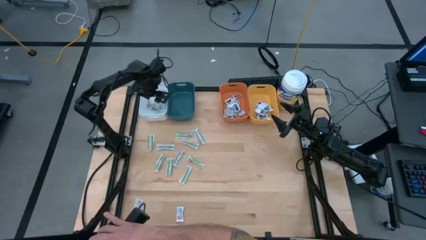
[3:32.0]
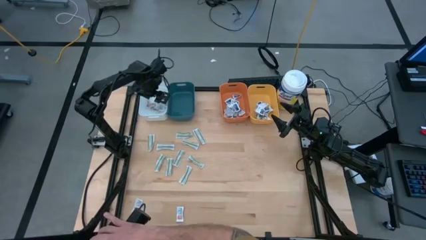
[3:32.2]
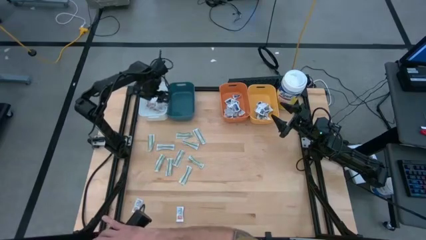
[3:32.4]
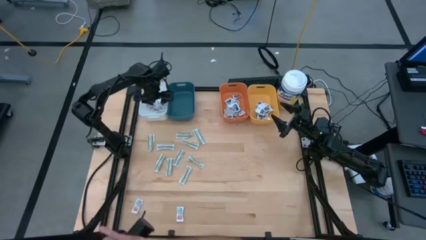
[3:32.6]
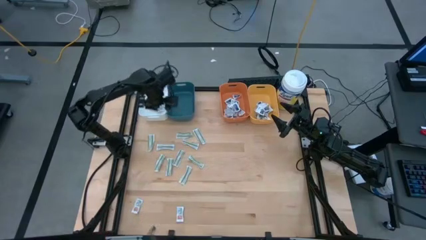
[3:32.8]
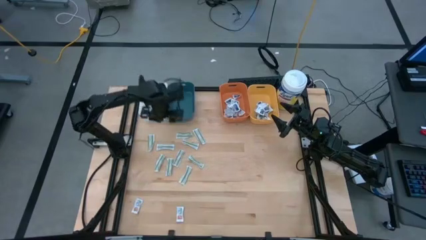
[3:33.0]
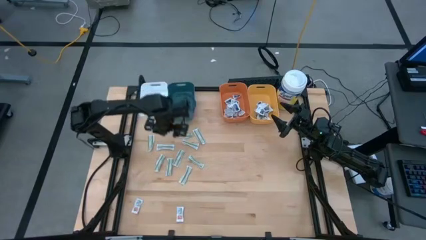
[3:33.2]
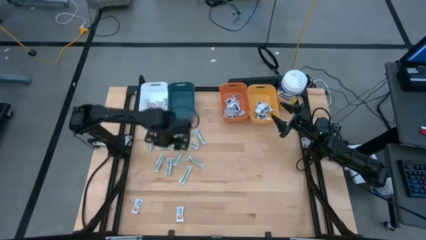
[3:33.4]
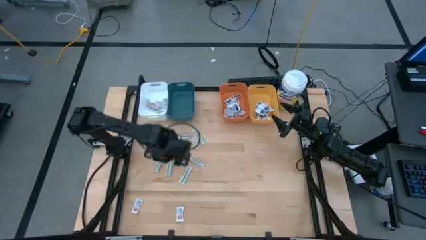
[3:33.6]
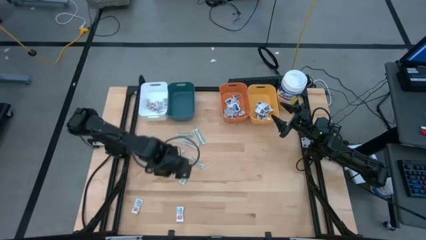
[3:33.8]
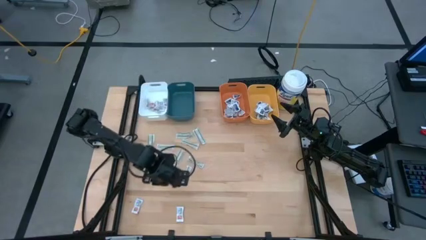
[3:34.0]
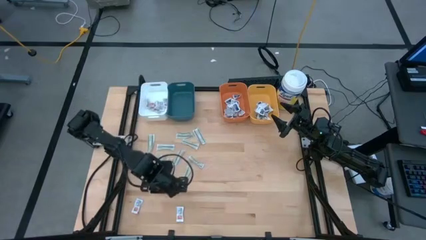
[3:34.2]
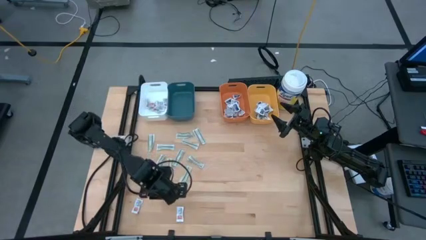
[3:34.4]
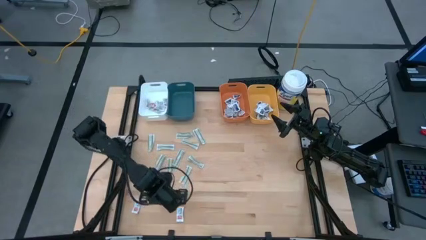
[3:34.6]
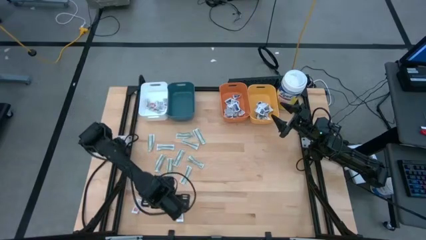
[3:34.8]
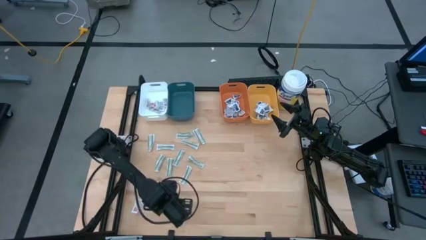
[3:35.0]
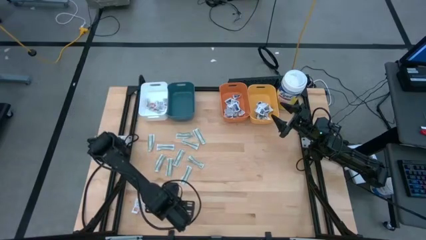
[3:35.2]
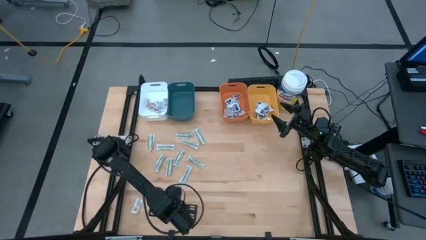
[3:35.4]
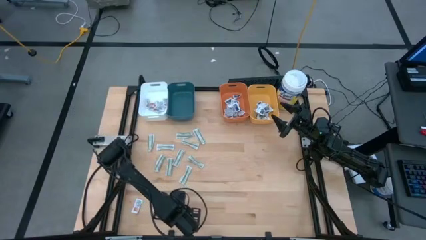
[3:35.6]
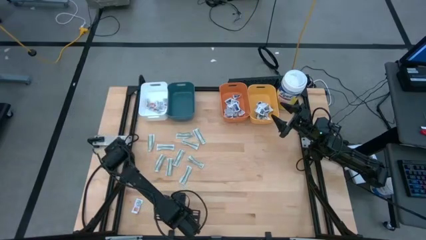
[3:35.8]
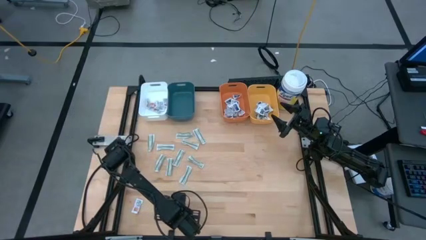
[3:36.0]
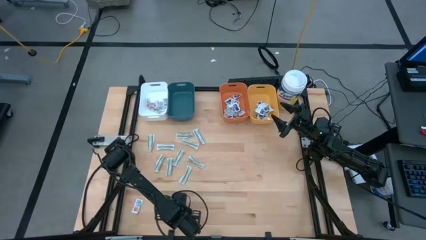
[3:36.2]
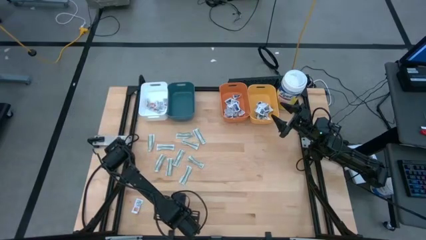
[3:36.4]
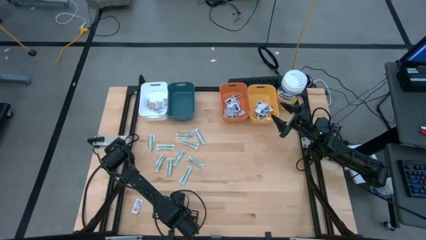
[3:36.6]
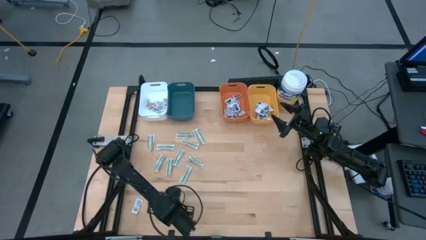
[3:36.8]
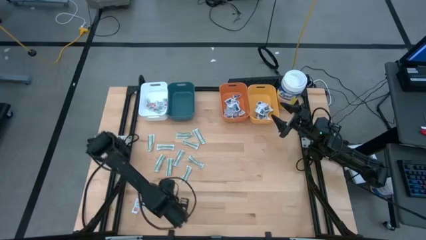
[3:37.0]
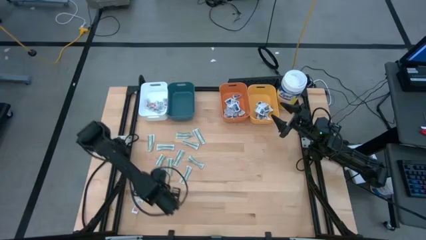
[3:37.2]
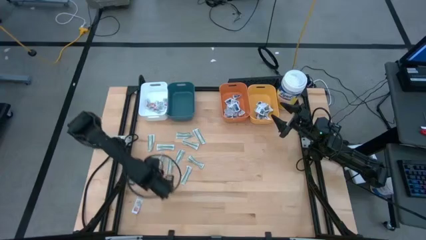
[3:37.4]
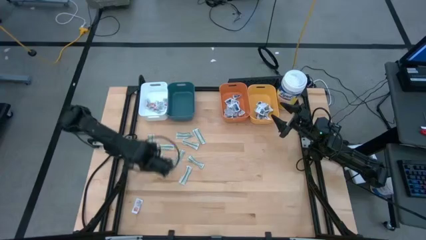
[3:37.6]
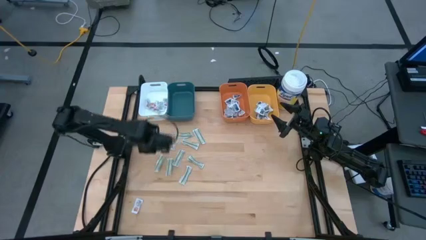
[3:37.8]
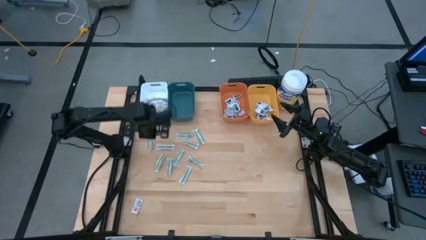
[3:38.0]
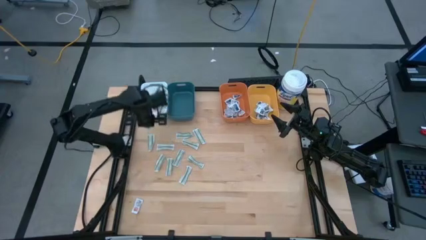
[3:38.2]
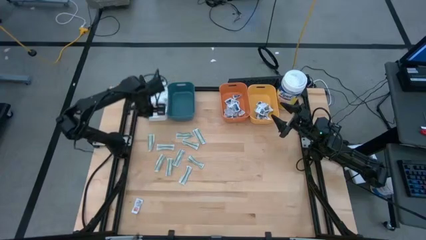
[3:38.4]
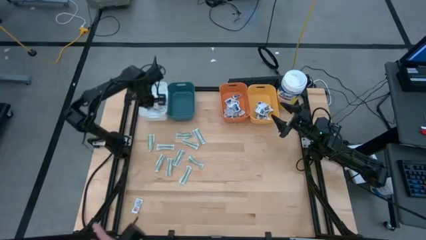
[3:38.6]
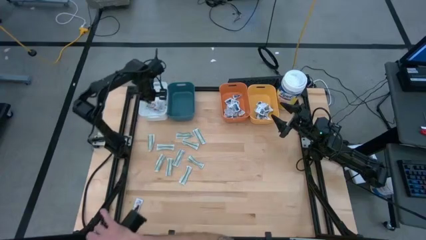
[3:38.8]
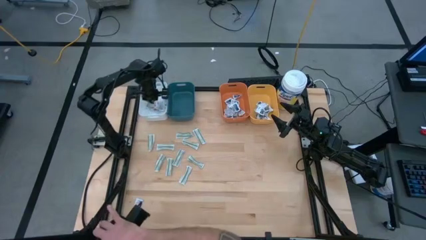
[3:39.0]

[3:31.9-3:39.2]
Task: Pick & Place First Aid Supplies
Put the ointment pack into the white bin

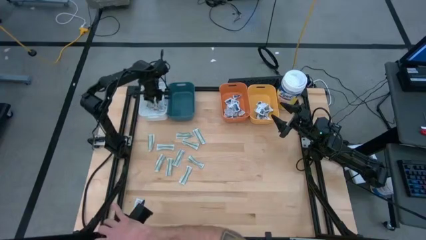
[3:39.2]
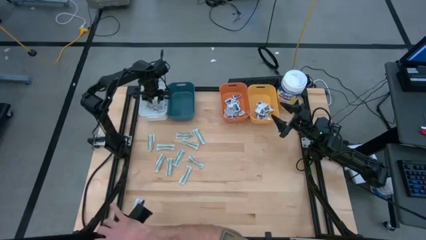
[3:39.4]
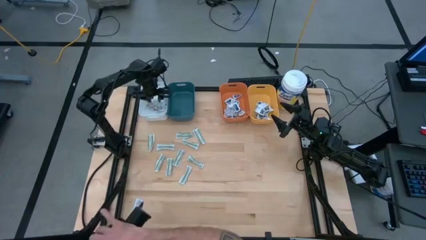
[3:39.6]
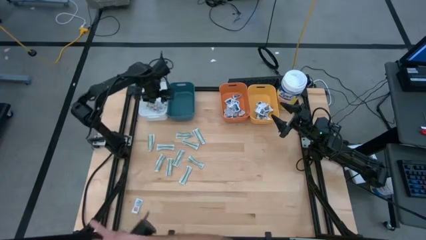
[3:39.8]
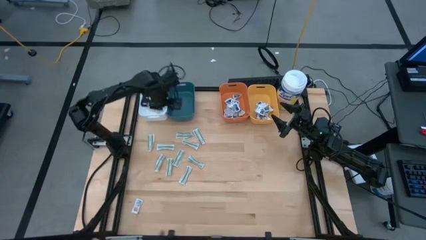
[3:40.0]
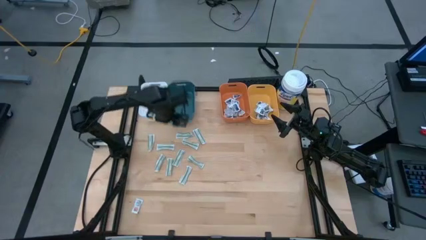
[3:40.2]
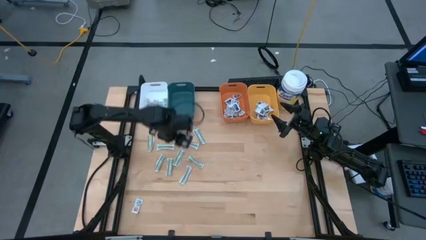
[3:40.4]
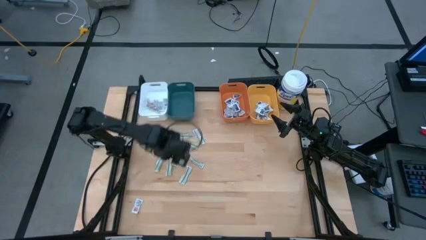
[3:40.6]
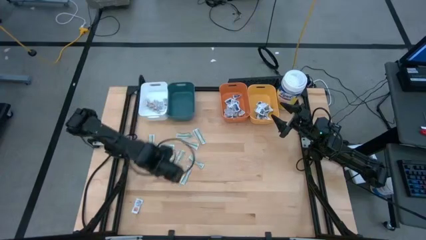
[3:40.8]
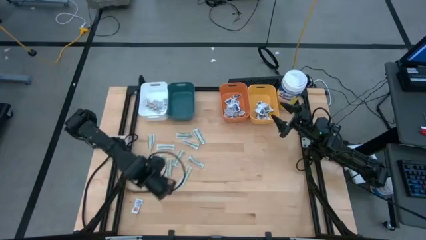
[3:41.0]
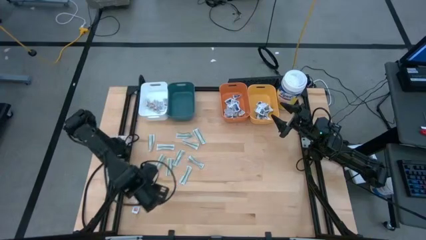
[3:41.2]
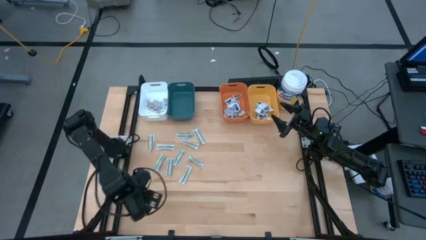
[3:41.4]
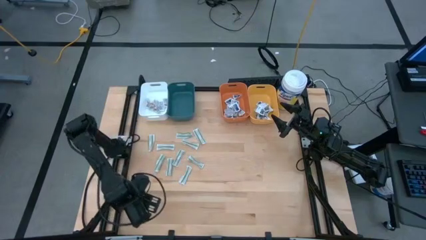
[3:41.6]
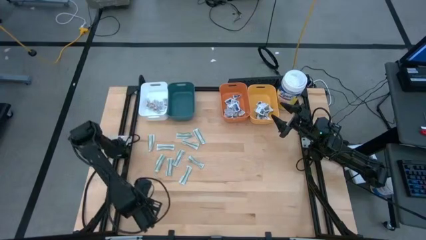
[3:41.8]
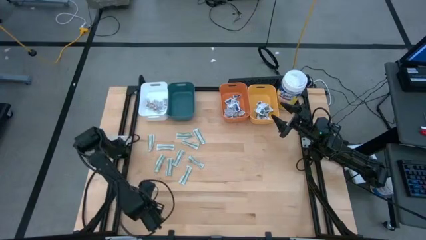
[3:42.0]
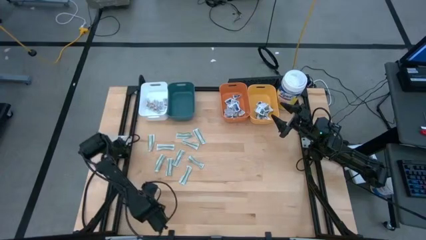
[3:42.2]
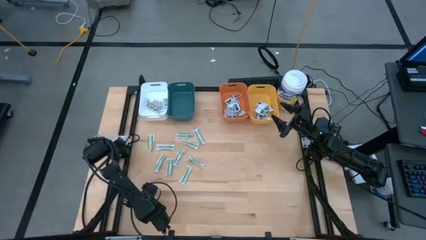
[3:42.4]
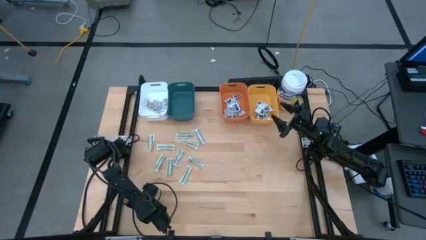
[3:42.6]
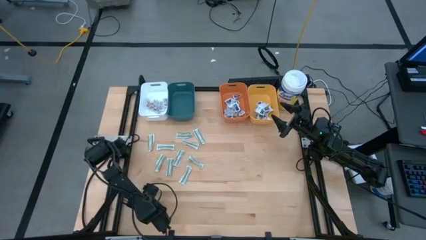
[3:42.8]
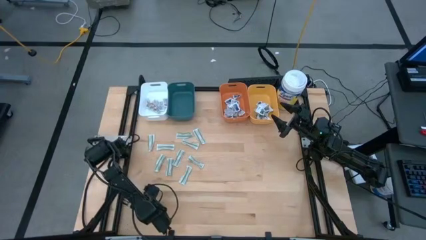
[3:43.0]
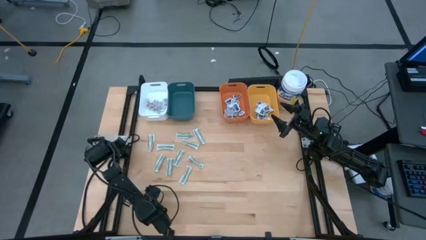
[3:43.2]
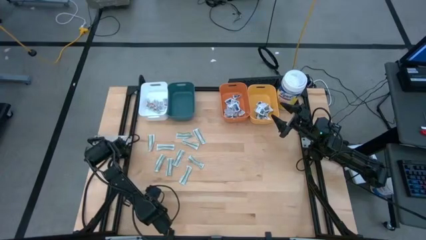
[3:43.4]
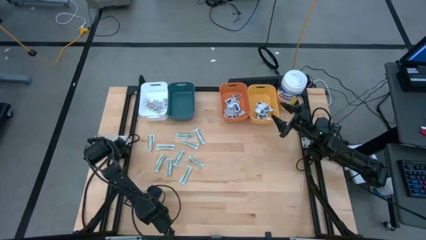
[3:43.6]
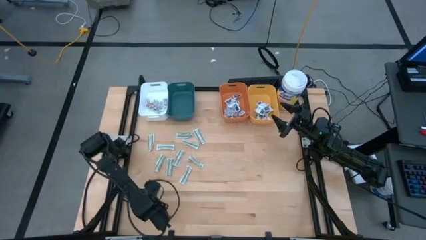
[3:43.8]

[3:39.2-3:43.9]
Put the ointment pack into the white bin

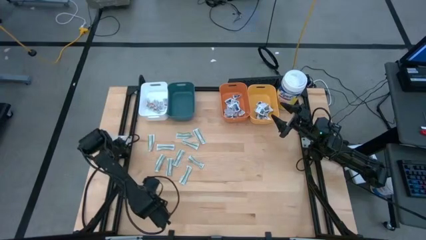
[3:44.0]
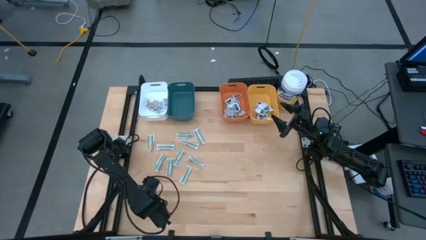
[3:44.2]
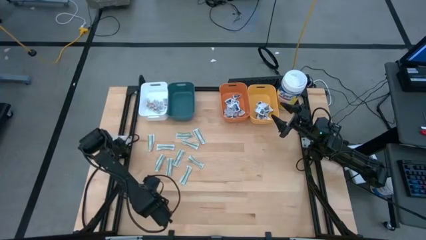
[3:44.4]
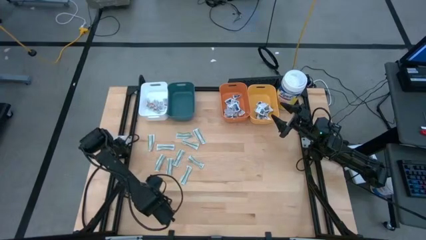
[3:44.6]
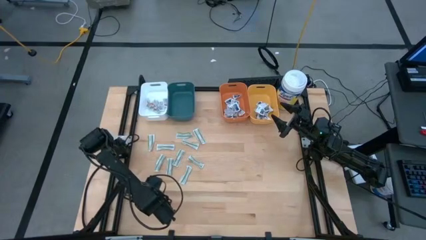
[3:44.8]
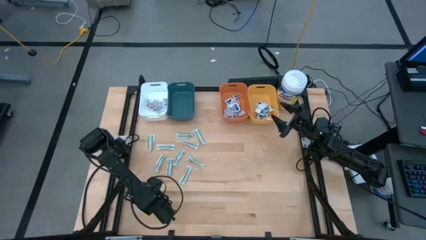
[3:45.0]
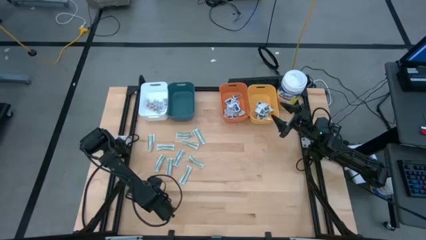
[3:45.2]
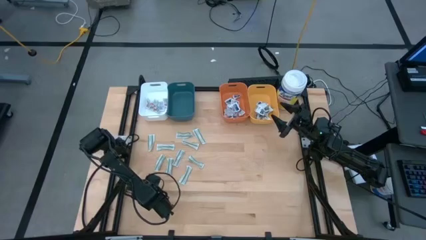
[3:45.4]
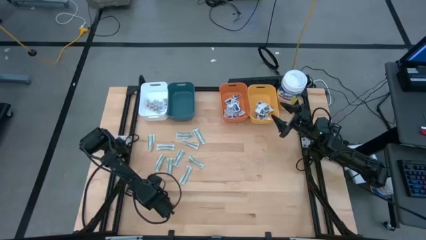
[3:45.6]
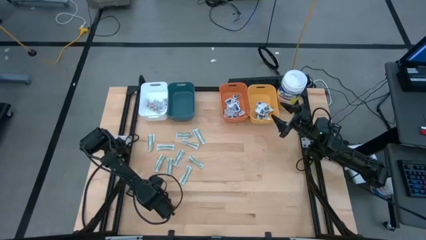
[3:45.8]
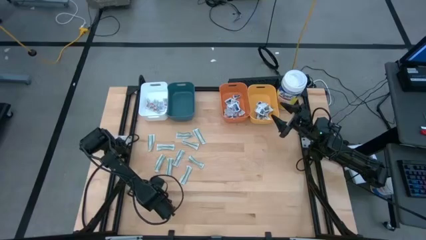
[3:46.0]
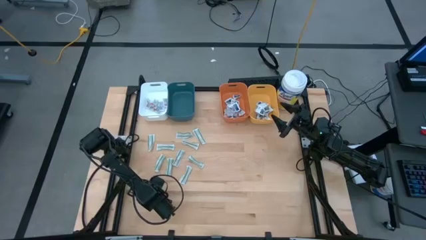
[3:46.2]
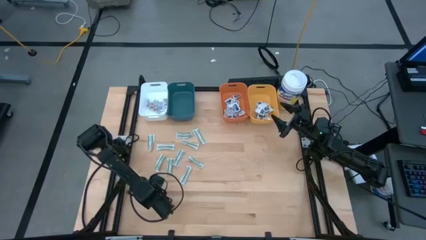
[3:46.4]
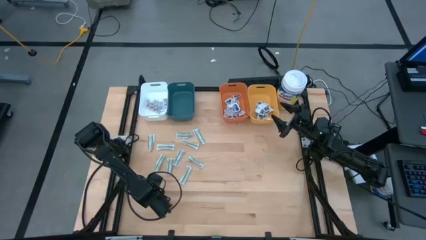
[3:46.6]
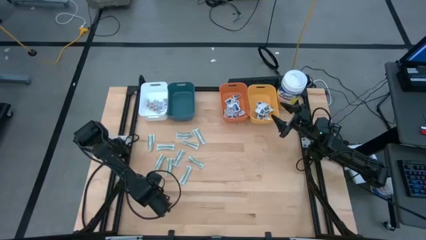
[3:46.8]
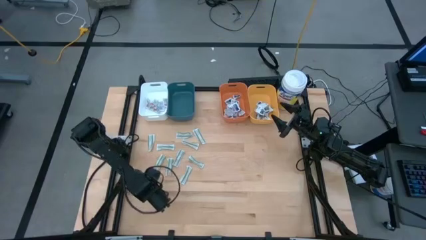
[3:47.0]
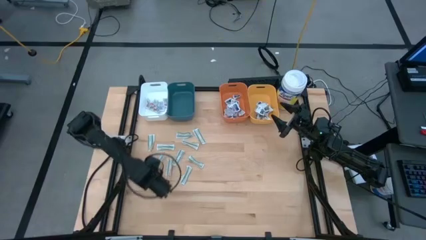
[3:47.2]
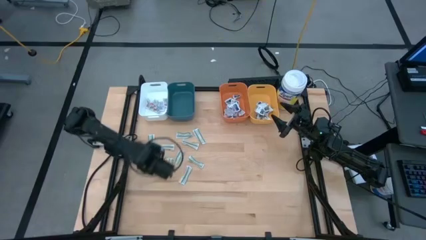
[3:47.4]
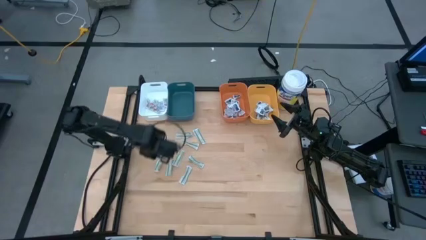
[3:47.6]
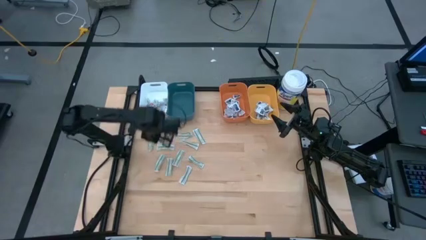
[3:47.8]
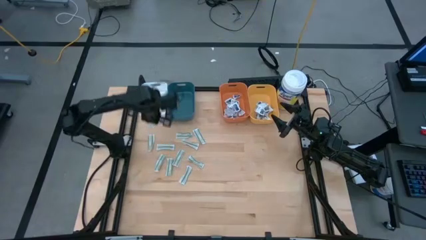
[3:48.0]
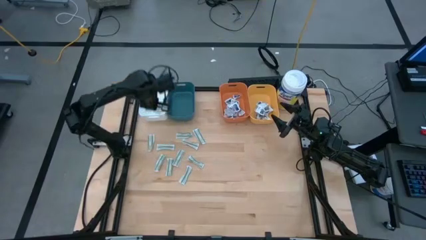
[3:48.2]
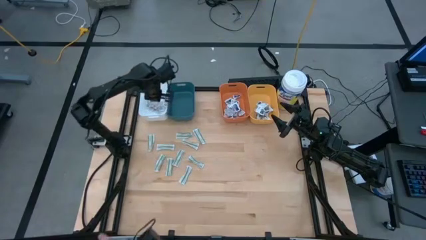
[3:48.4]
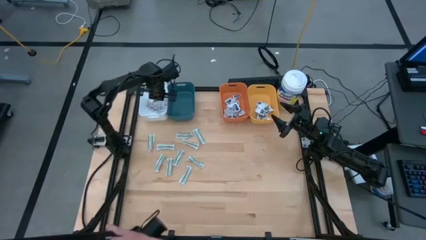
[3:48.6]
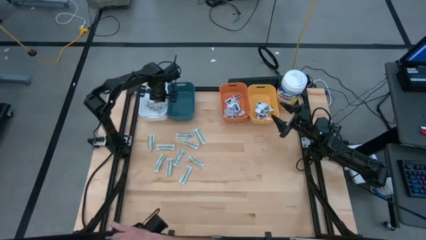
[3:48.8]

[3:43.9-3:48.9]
Put the ointment pack into the white bin
